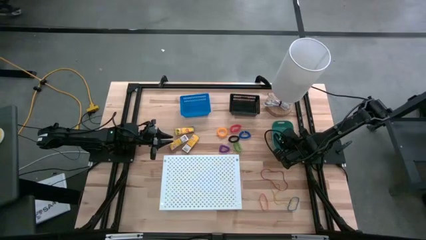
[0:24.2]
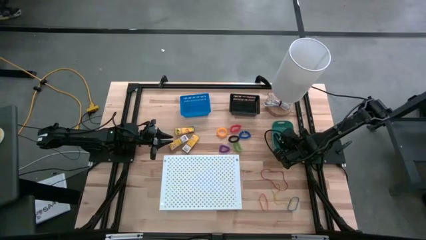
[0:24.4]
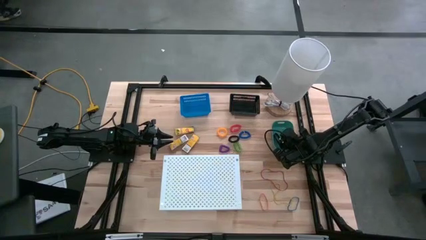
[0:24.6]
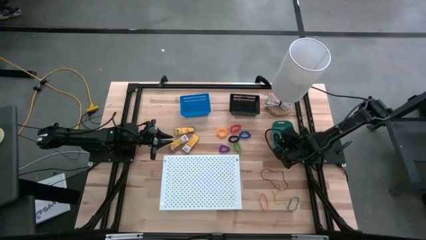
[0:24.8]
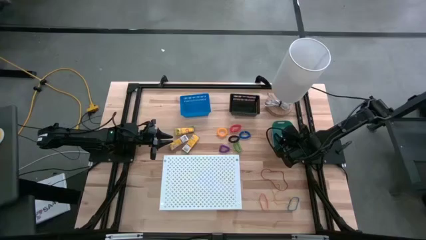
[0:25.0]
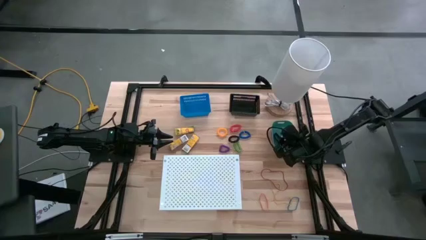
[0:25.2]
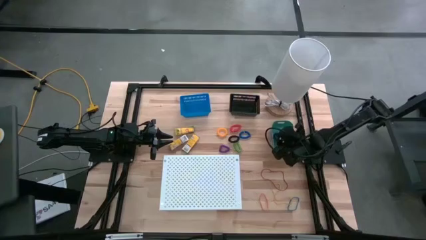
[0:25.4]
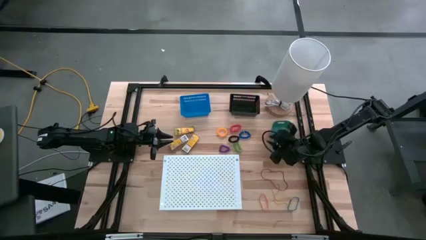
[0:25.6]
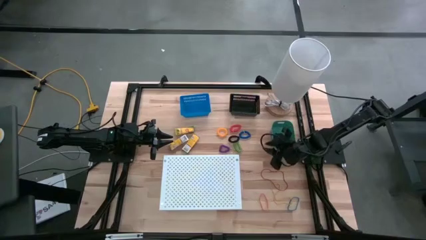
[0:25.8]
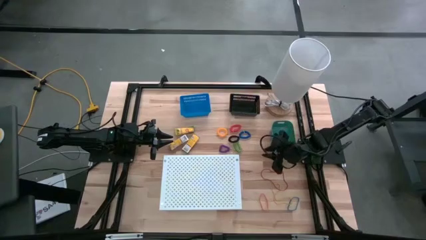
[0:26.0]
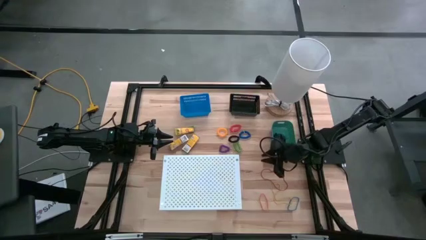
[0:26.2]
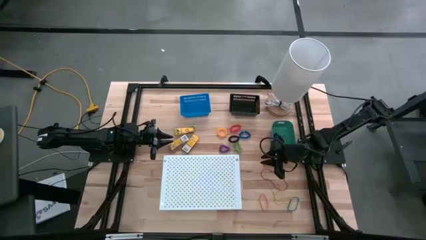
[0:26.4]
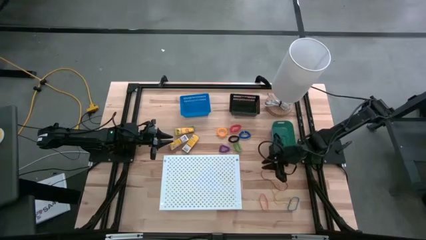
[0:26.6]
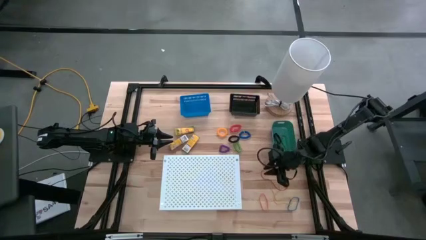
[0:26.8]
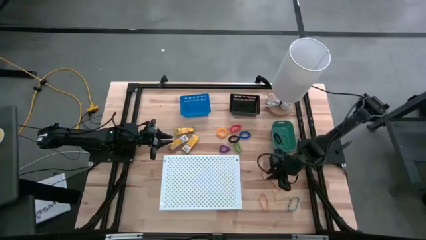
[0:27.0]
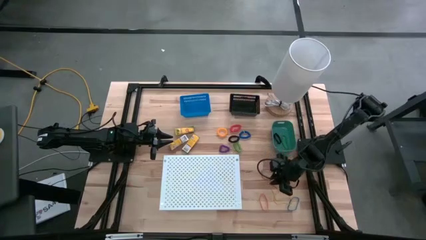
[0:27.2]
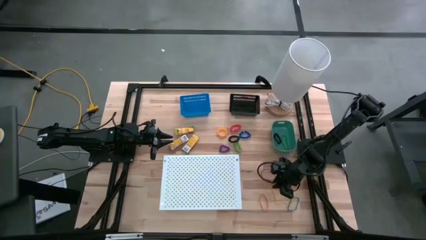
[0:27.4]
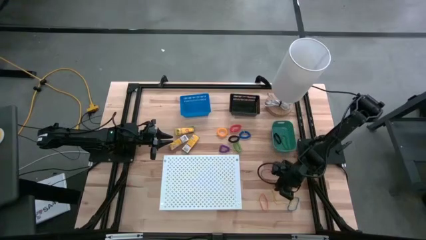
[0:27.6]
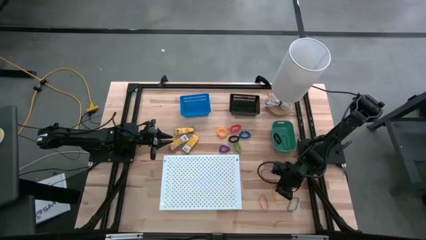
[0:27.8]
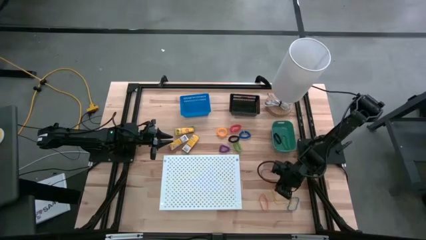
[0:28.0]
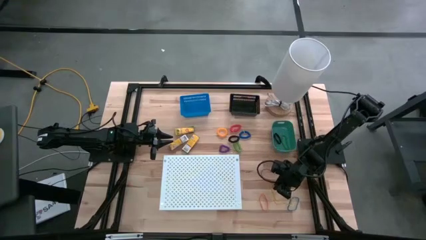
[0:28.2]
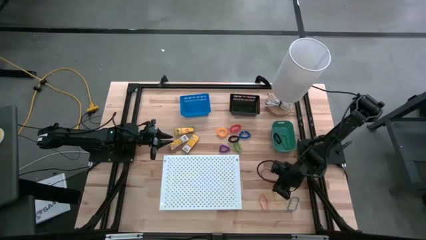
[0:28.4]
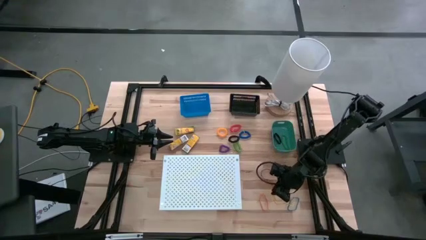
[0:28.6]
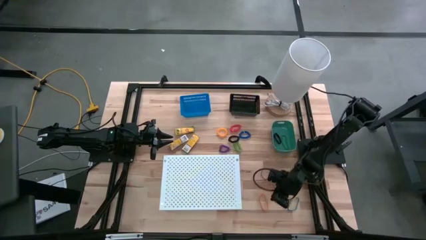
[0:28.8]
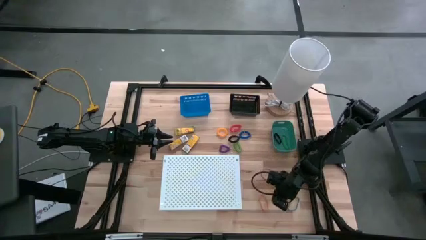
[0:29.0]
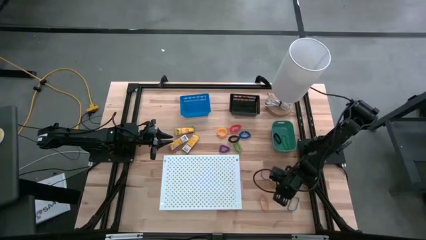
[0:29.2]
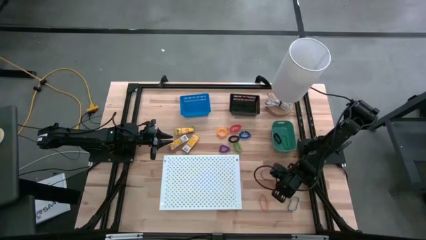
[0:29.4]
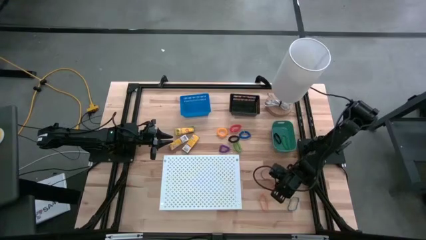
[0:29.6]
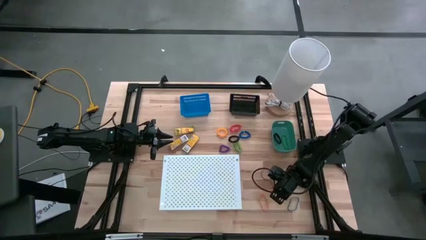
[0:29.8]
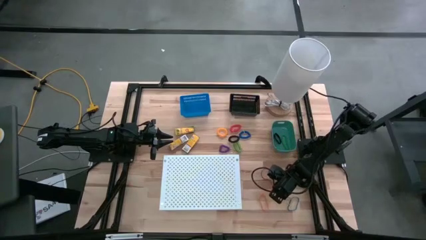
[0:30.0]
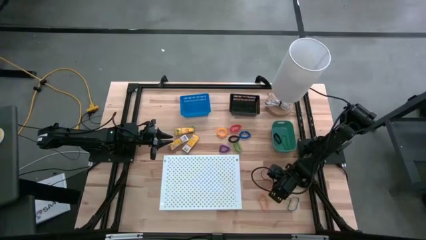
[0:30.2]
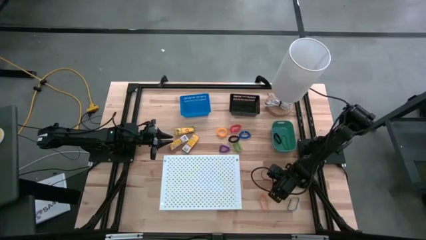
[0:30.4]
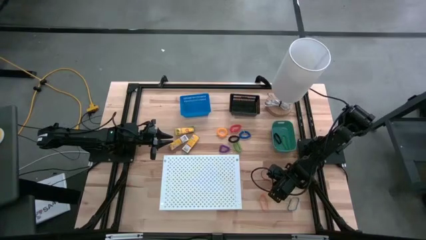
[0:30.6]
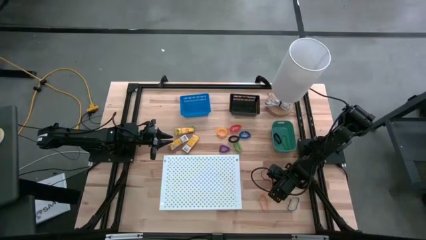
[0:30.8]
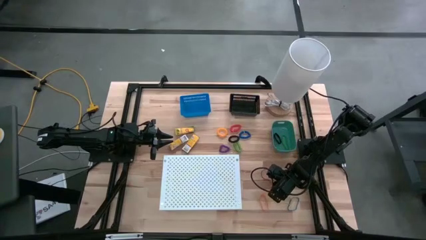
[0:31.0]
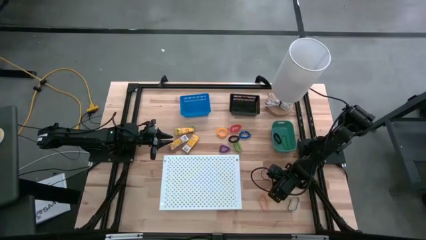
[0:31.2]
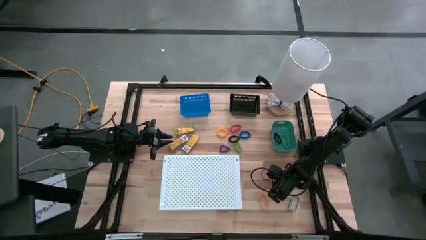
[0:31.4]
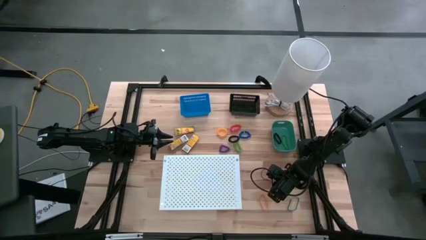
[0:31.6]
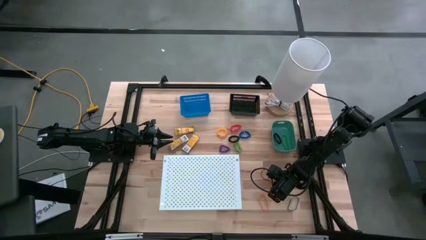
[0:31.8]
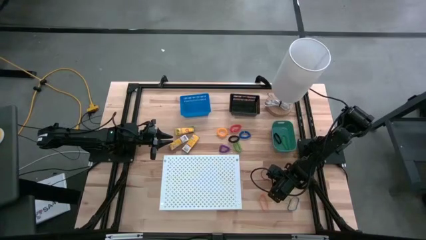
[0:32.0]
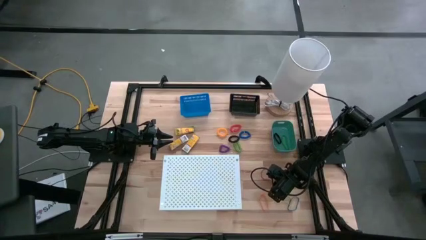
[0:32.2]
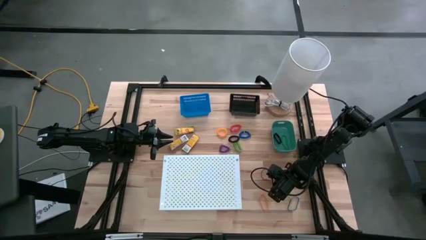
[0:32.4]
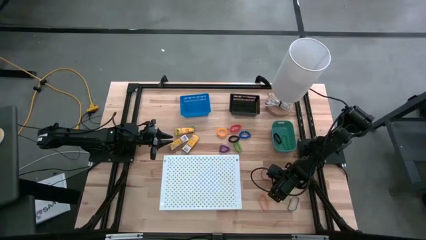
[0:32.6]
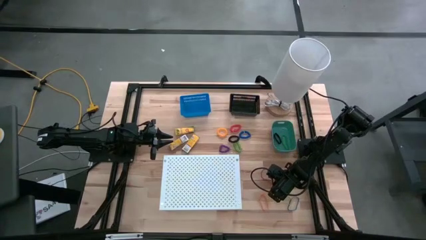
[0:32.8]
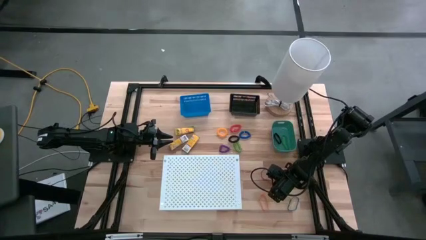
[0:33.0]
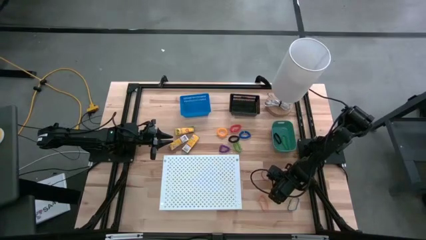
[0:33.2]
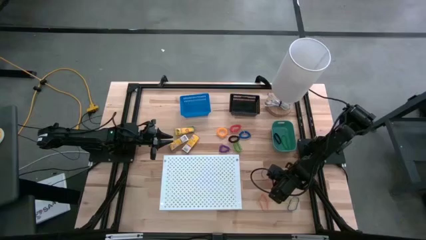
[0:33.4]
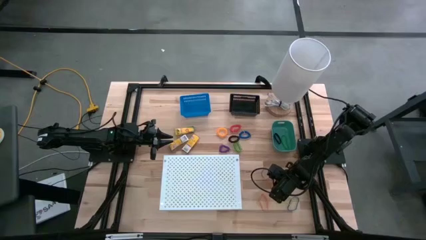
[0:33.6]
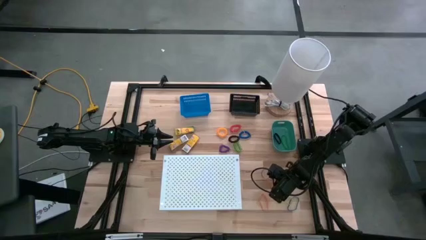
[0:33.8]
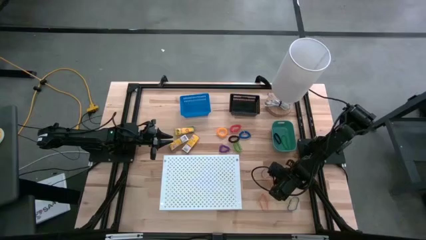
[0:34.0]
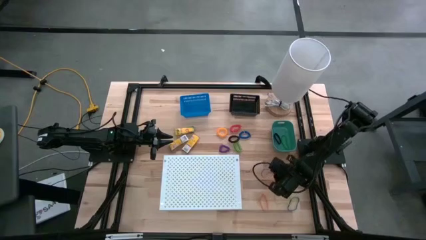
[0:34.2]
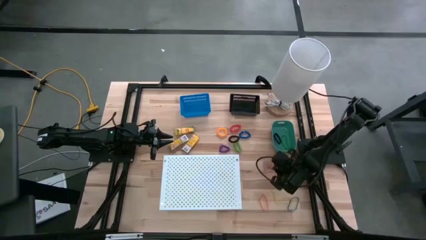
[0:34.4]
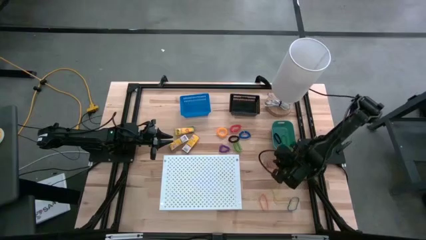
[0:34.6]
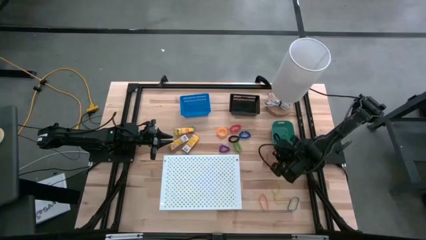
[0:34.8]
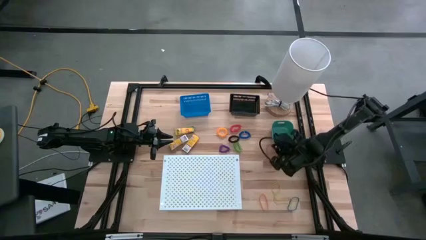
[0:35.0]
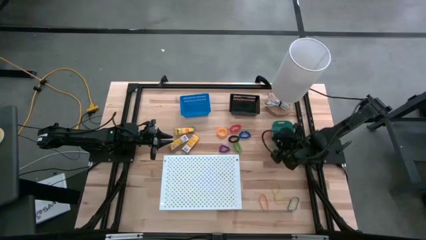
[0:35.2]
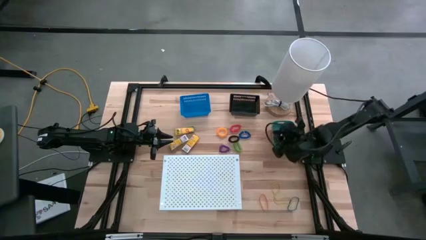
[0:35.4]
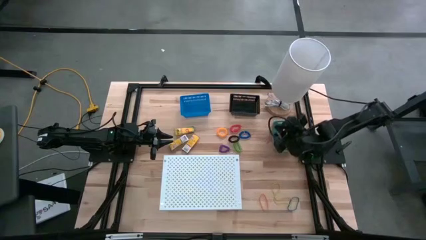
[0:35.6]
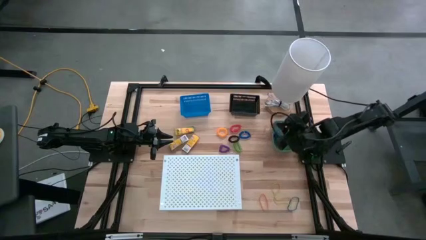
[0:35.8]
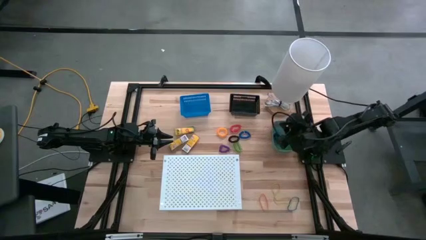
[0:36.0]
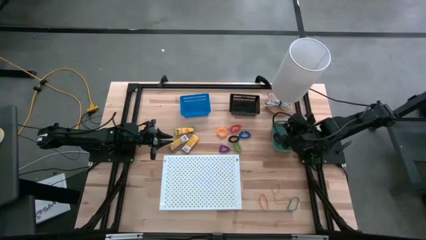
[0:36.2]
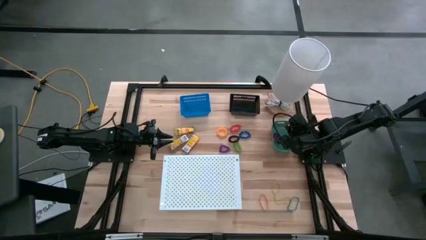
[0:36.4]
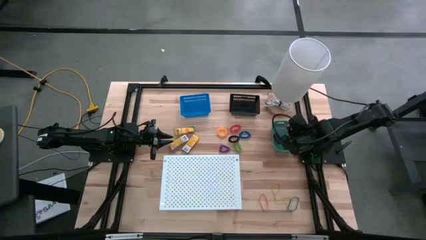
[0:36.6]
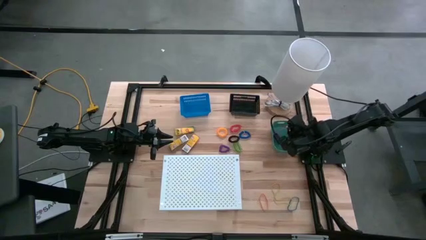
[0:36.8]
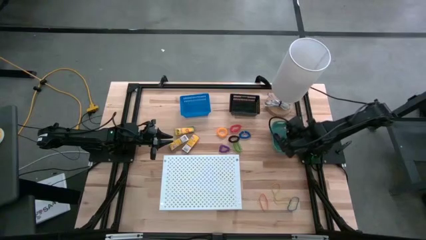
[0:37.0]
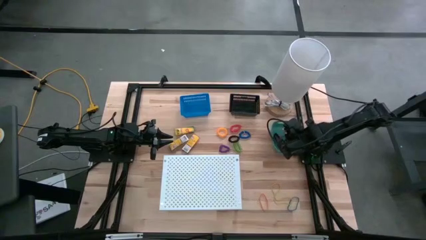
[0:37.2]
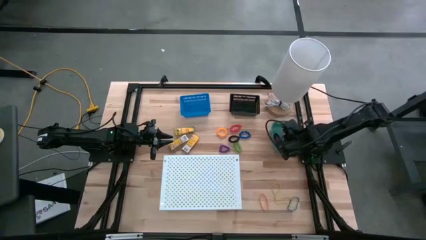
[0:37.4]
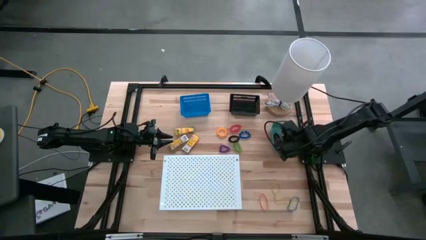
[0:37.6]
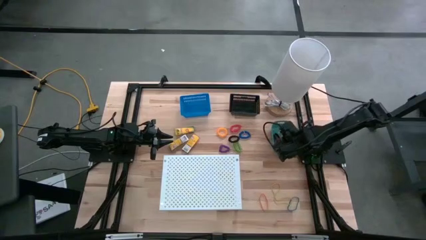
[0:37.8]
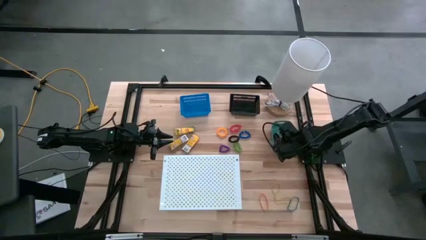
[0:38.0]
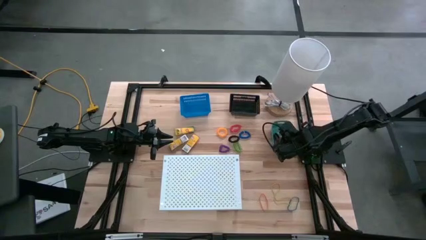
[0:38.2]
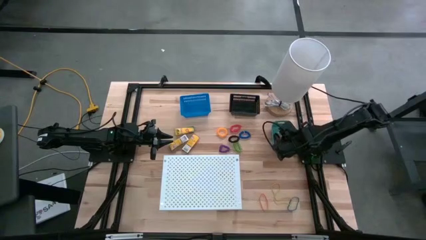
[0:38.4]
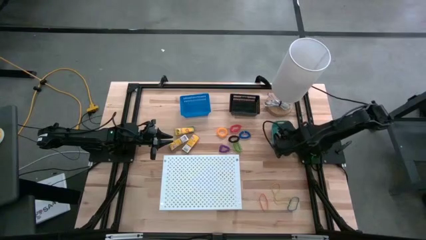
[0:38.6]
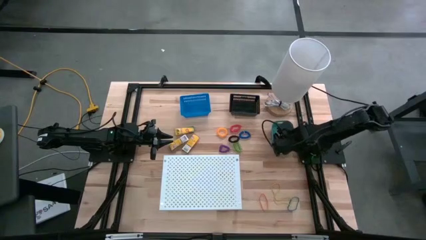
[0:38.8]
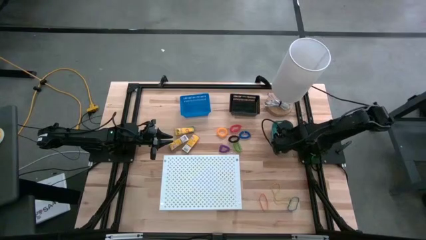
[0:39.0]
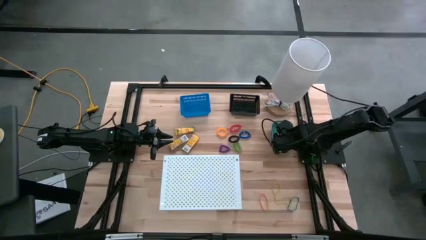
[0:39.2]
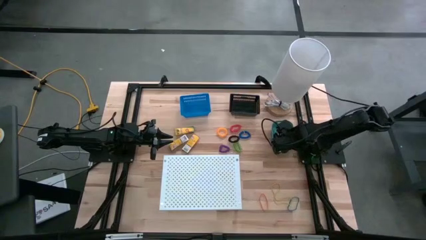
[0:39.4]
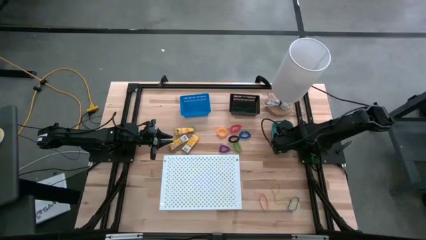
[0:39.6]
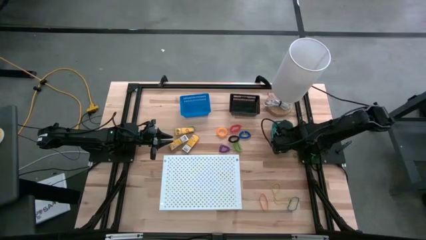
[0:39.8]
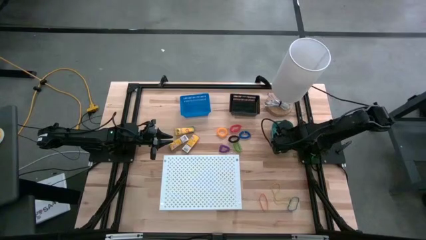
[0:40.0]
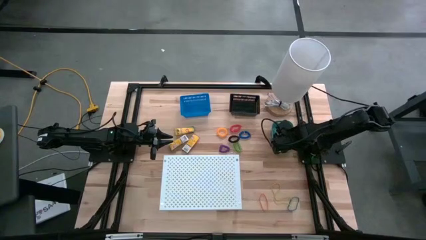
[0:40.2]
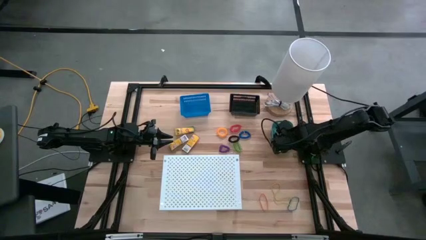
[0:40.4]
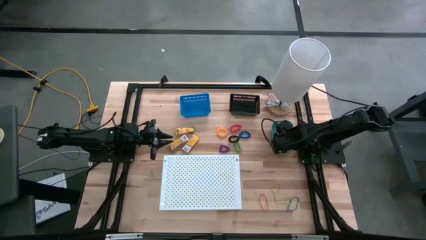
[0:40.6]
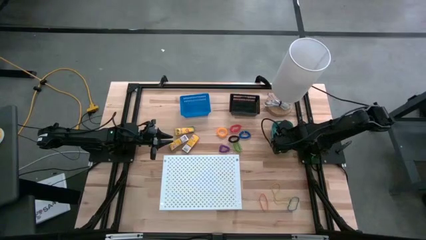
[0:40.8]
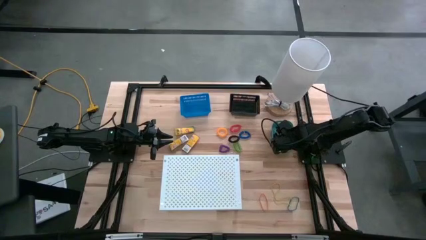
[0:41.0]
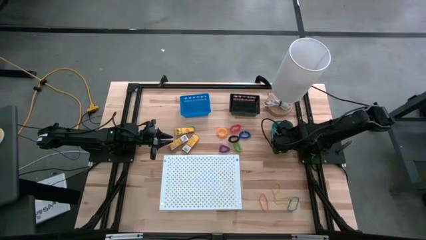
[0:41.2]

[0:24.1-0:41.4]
Task: Pick & Place Office Desk Supplies
Put the red rubber band into the green bin
